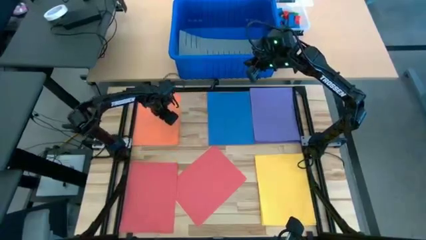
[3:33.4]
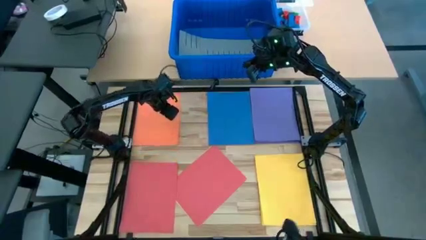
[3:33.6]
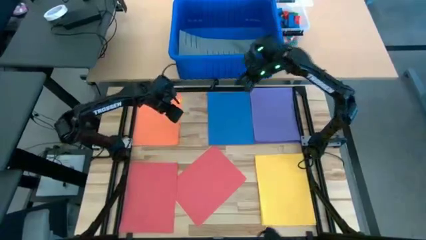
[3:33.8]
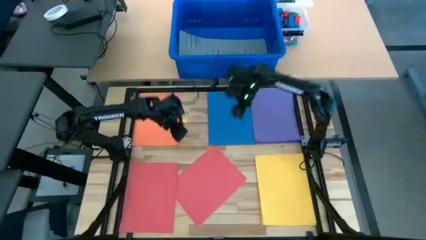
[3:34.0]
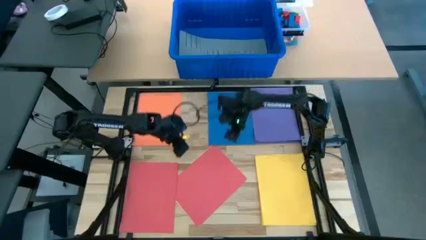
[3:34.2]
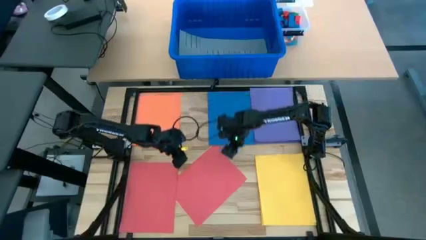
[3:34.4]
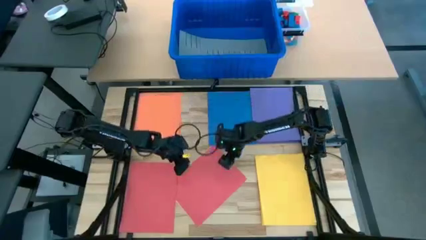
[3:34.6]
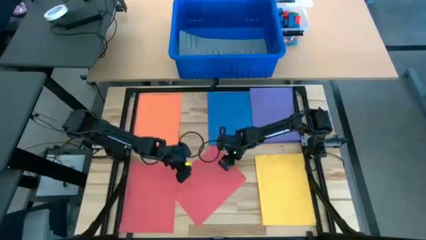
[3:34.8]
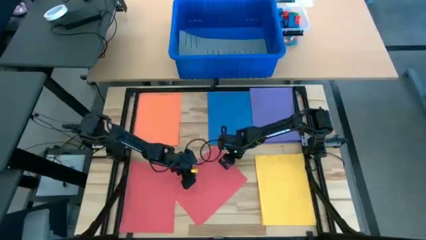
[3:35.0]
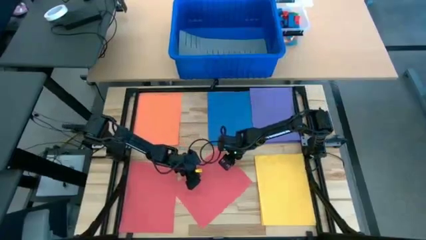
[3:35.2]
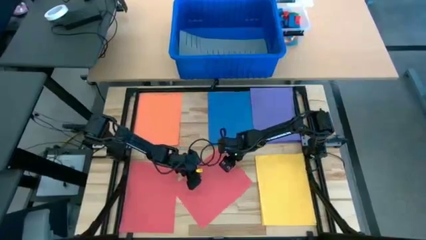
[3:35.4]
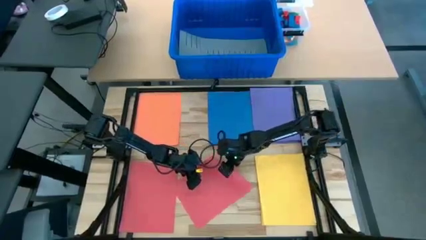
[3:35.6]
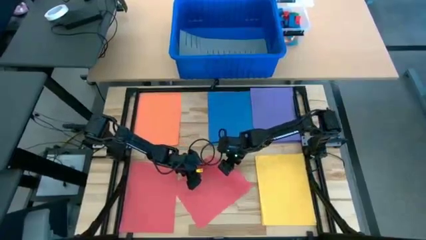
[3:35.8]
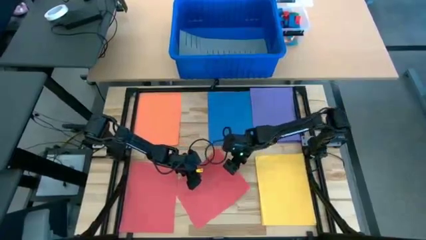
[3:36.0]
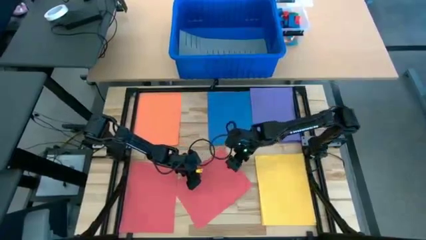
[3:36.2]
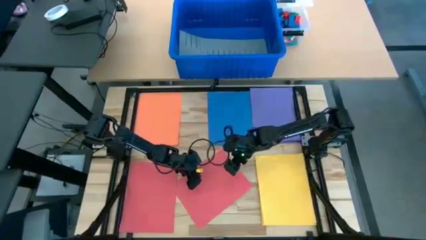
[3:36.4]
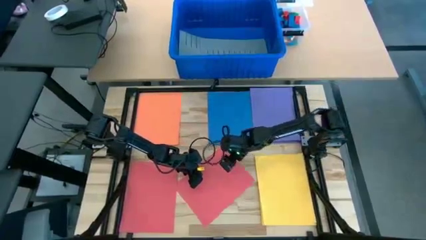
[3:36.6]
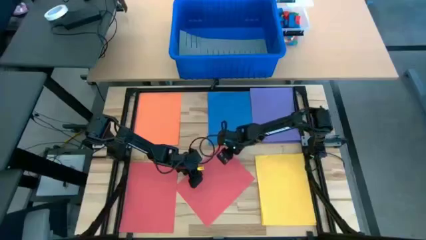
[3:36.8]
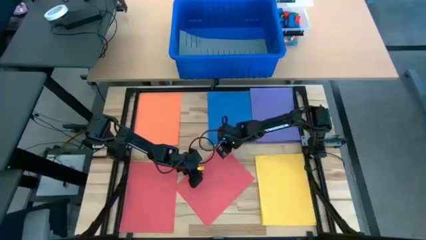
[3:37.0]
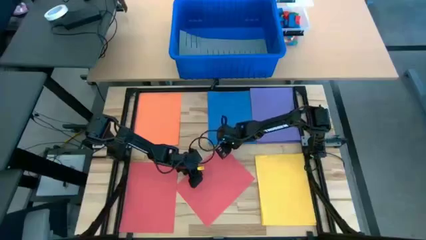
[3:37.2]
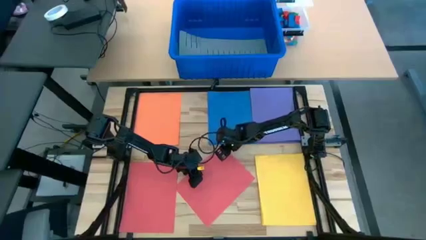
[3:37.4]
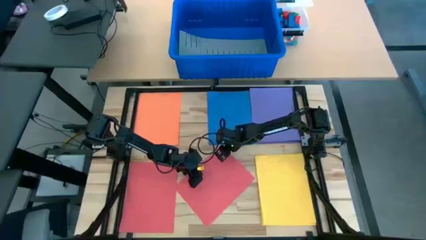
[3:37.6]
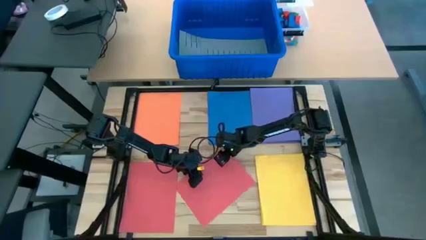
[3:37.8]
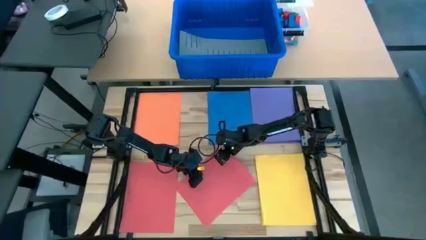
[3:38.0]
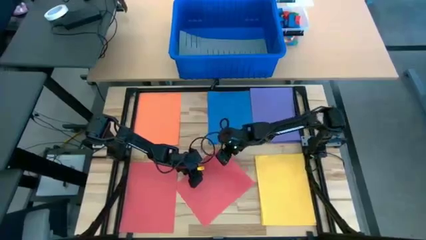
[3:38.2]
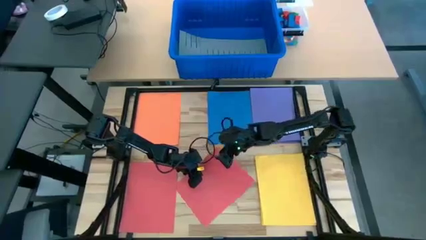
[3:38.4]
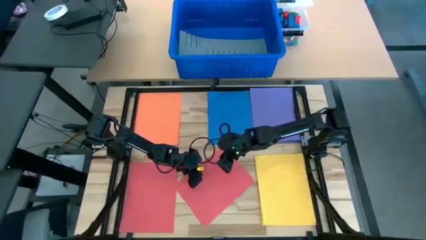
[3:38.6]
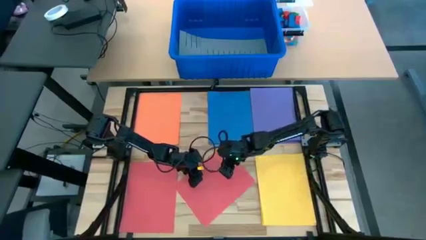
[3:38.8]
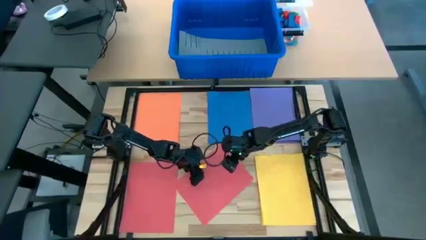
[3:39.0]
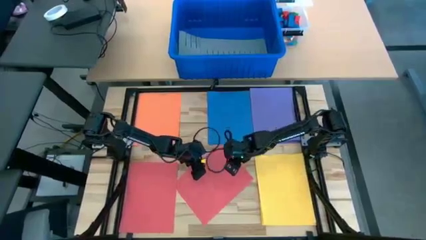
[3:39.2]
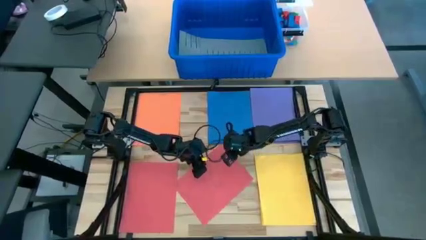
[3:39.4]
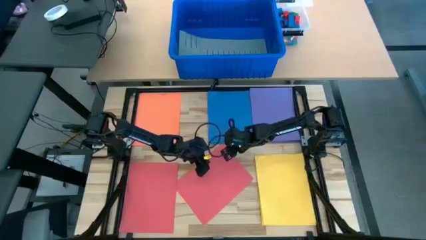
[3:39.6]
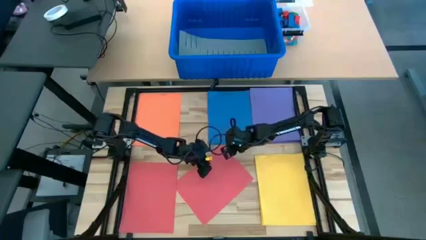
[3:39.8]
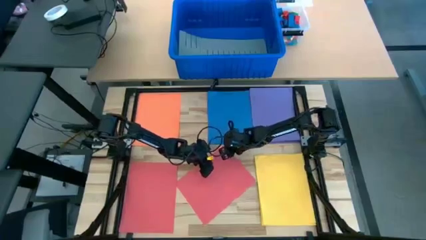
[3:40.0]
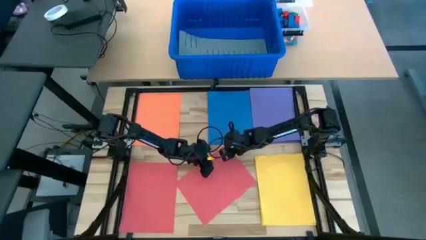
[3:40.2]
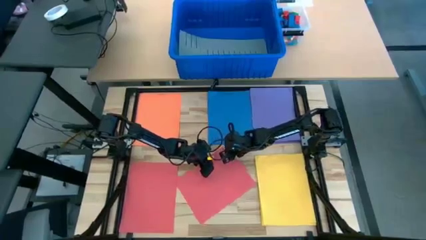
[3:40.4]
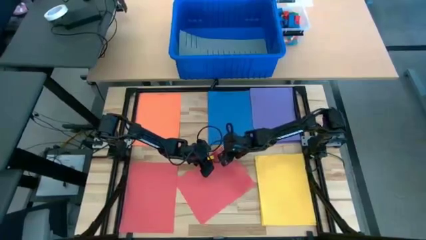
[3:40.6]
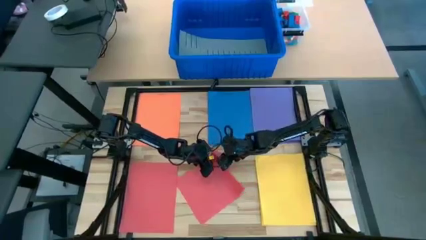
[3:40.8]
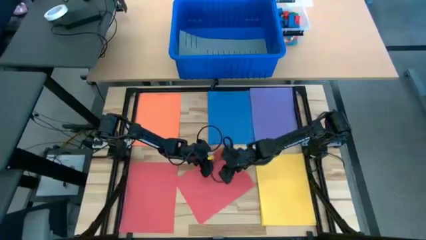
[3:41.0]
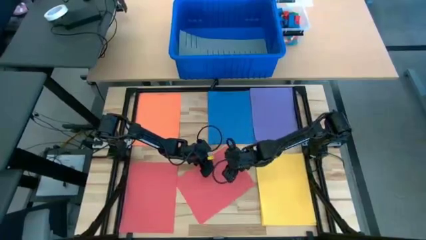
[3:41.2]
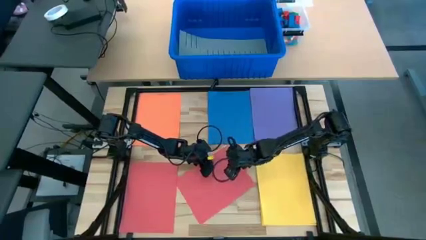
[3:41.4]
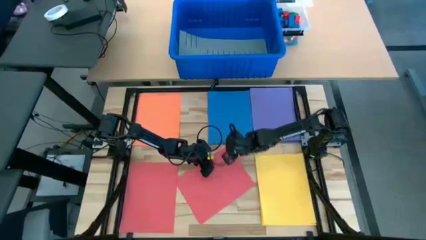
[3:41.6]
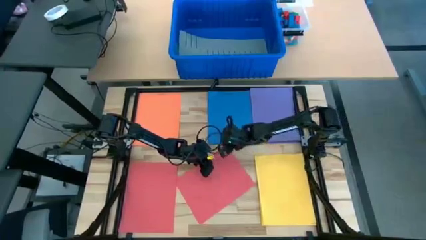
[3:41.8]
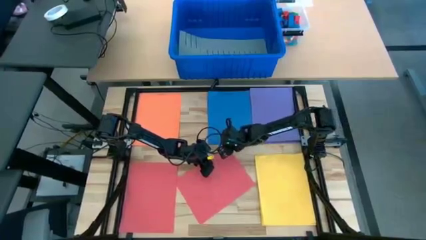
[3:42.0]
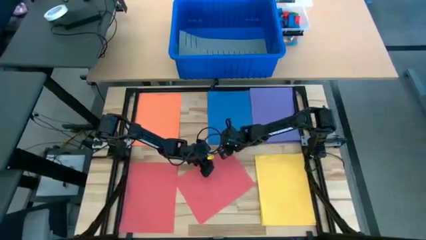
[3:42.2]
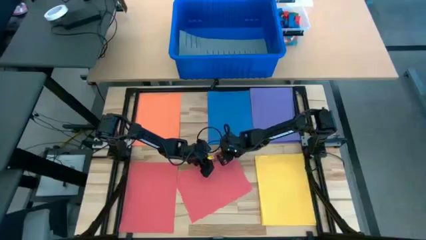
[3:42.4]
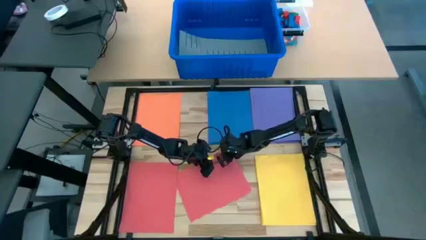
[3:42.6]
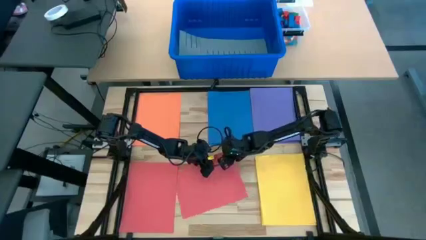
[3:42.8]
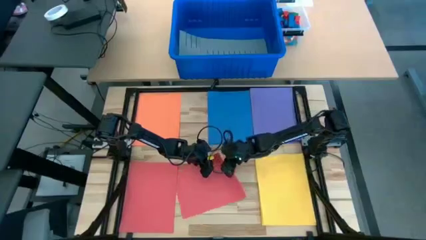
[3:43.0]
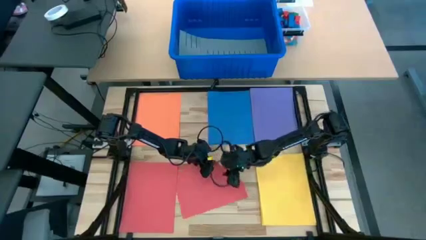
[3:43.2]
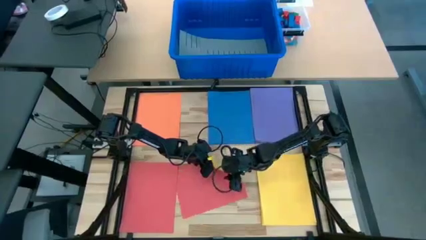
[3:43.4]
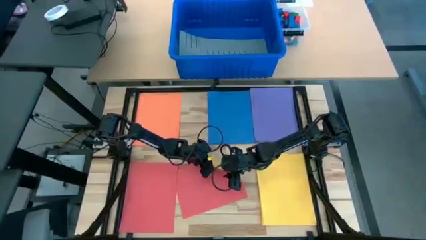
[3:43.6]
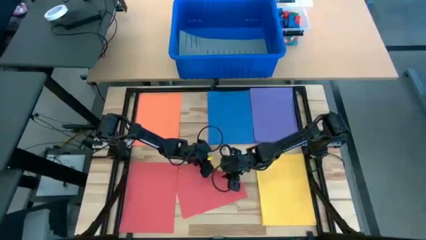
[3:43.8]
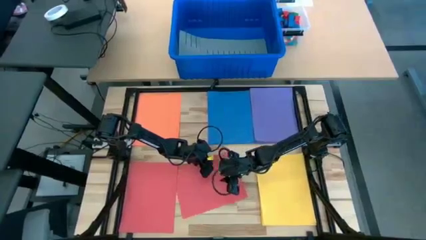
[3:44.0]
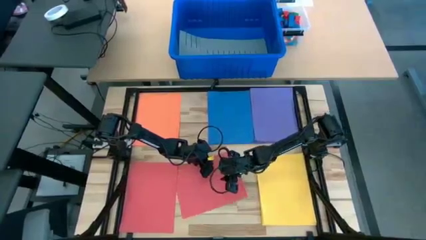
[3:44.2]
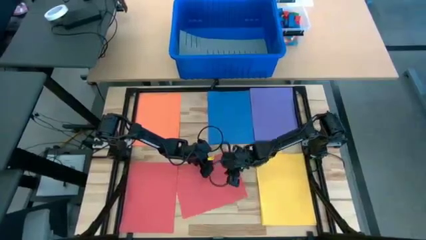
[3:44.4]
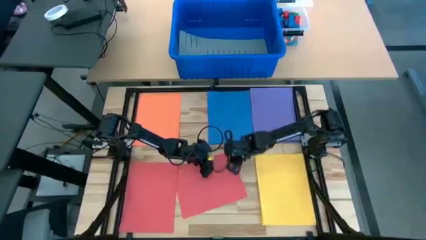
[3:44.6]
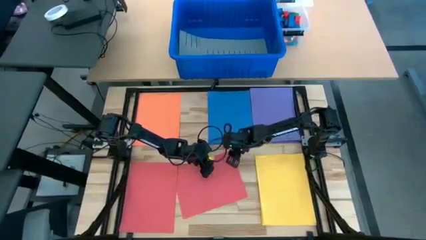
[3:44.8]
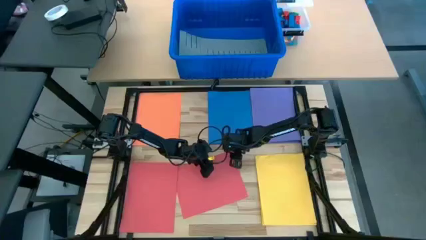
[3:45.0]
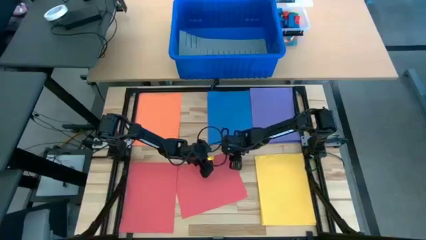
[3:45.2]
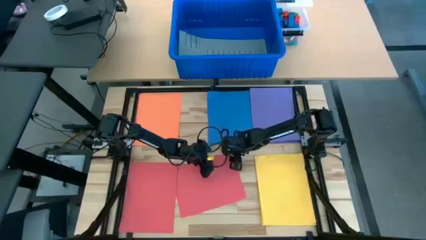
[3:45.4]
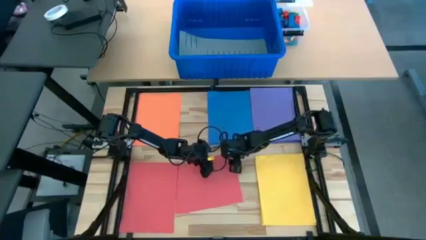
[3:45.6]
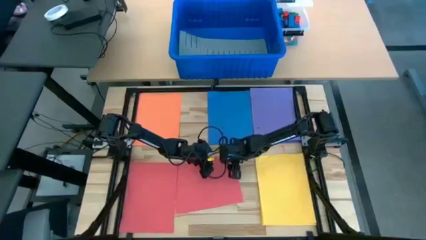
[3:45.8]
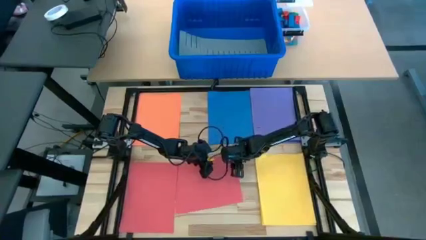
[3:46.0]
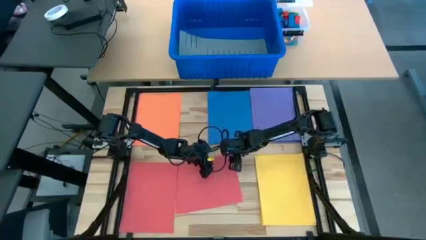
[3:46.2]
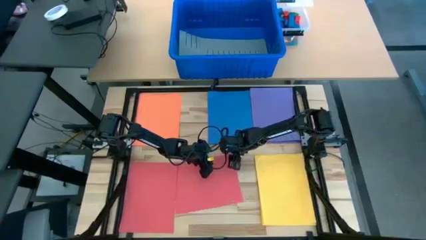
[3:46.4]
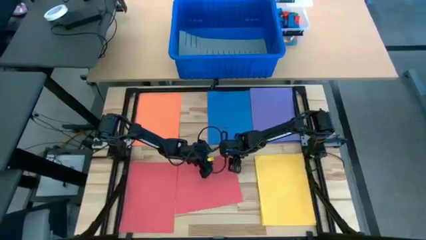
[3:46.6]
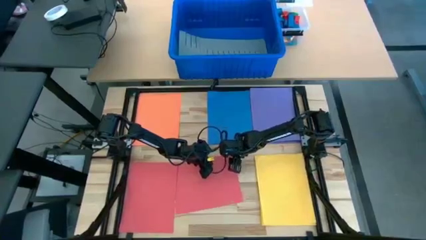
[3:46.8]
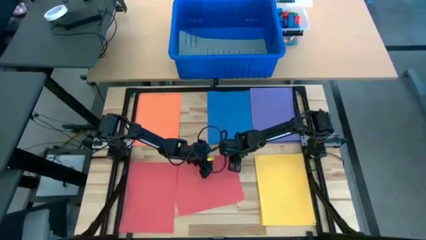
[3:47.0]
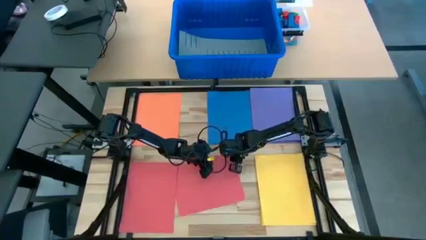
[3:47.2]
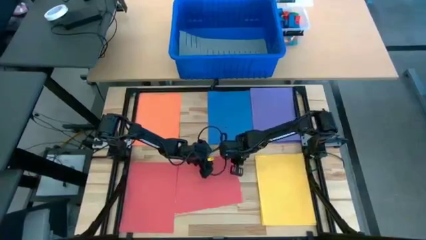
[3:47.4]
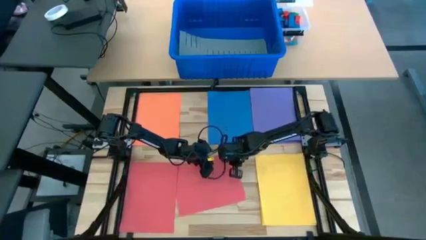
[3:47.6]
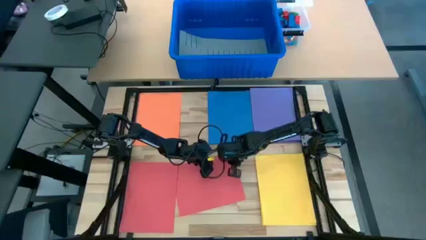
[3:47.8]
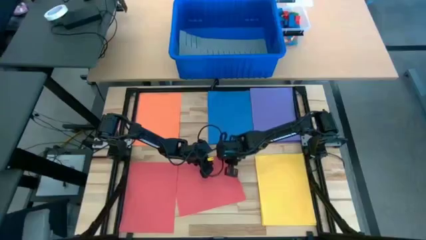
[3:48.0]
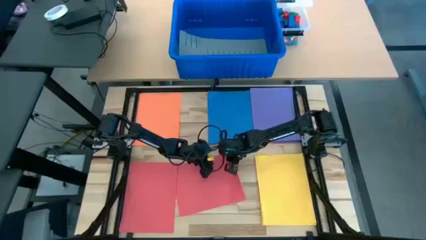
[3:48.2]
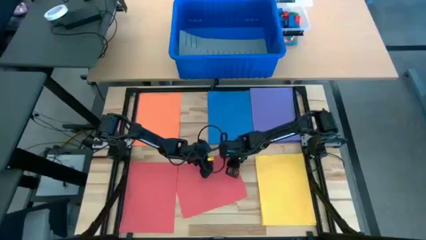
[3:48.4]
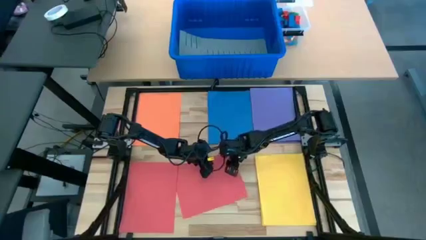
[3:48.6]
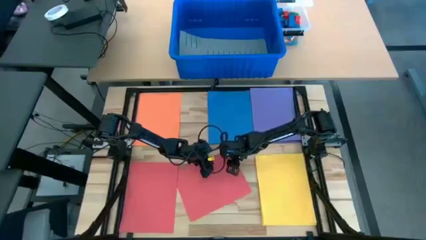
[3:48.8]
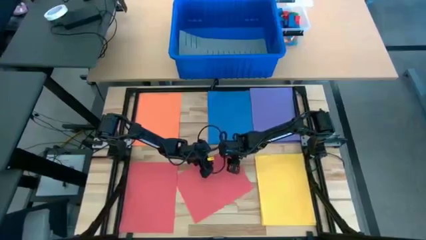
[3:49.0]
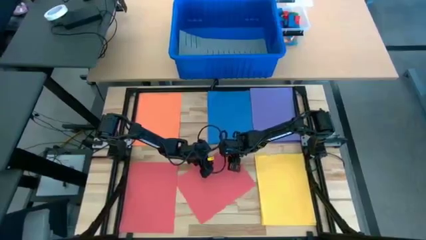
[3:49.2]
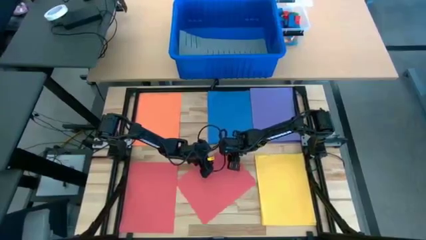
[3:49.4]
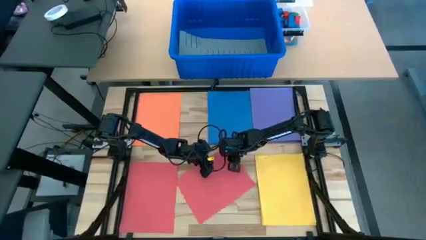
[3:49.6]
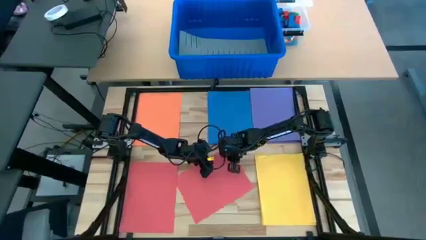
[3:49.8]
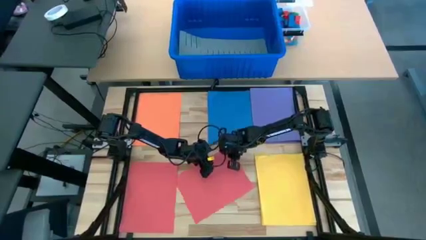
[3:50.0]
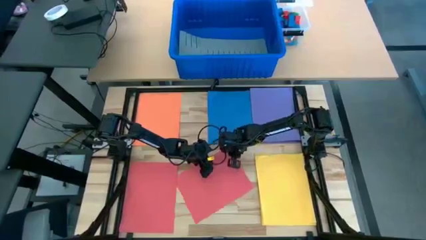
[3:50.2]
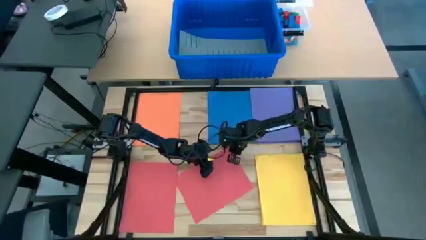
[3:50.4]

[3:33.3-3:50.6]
Task: Organize paper
Stack the red paper on top of the other red paper
